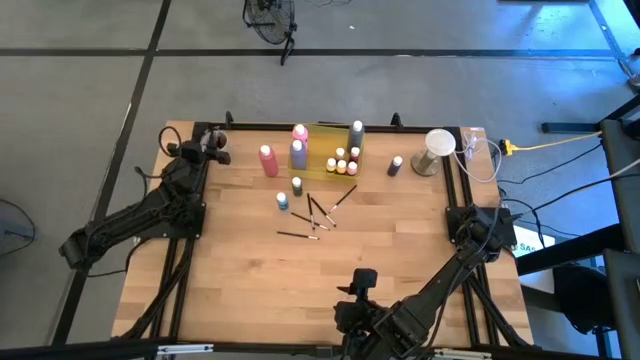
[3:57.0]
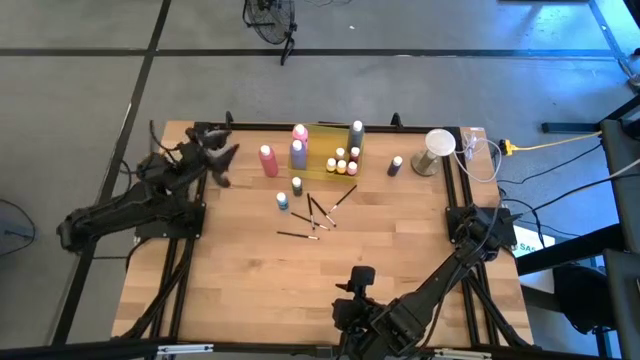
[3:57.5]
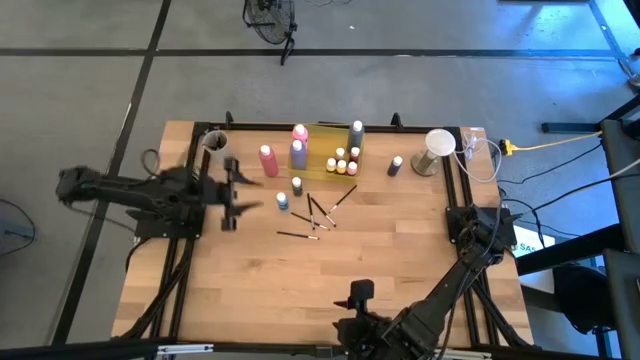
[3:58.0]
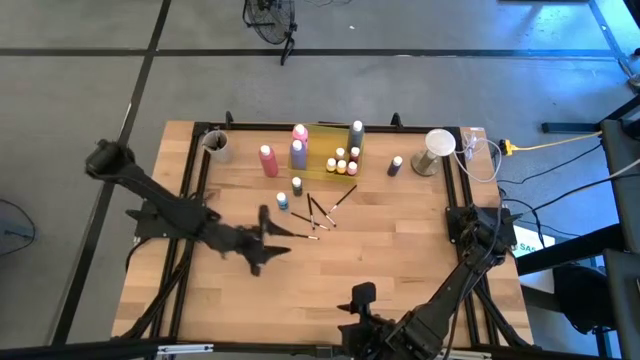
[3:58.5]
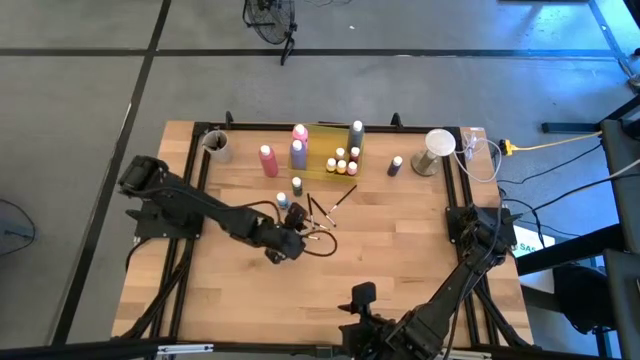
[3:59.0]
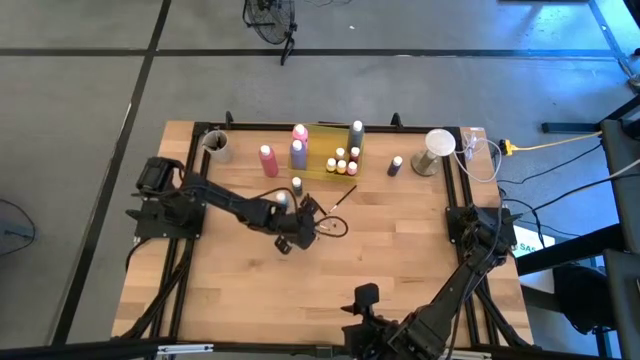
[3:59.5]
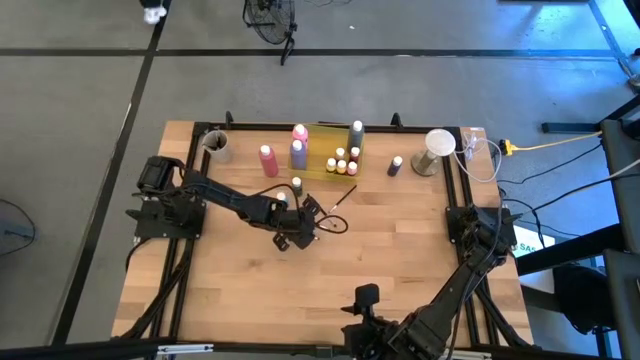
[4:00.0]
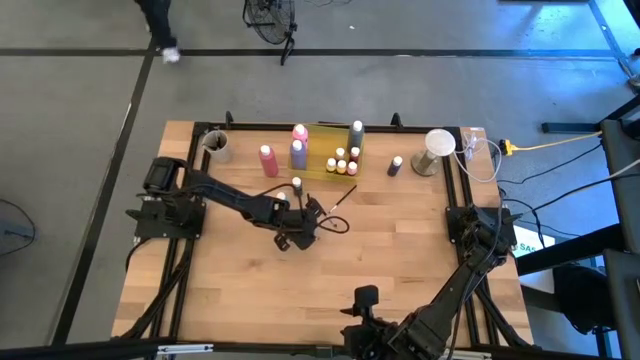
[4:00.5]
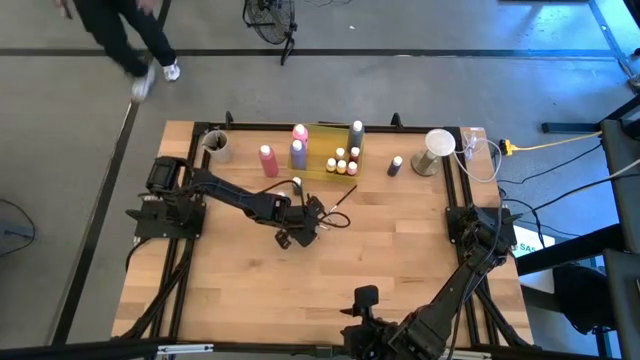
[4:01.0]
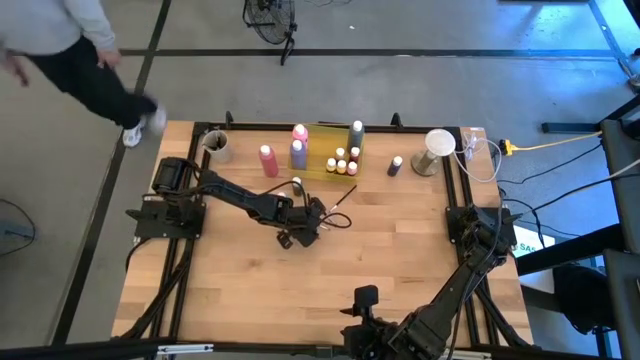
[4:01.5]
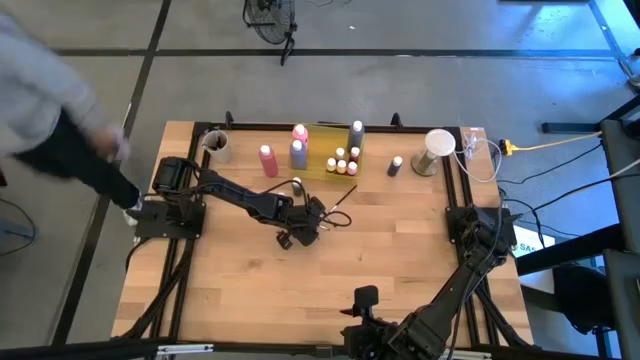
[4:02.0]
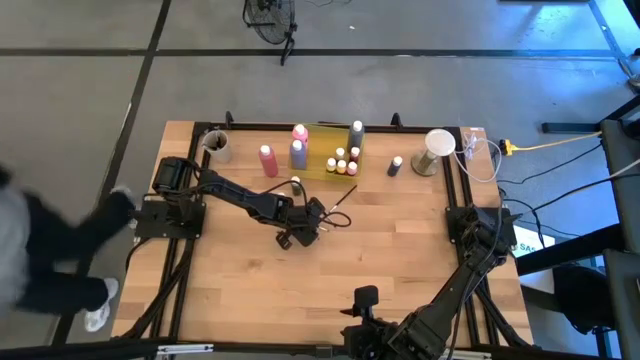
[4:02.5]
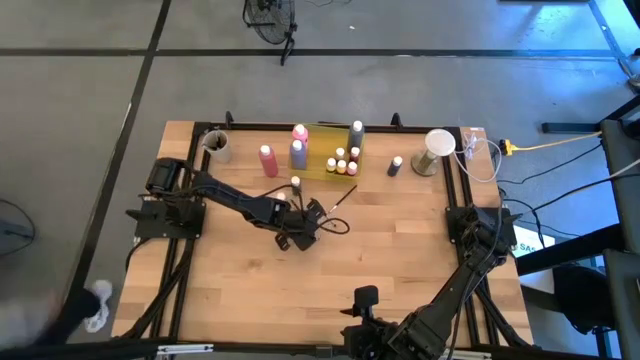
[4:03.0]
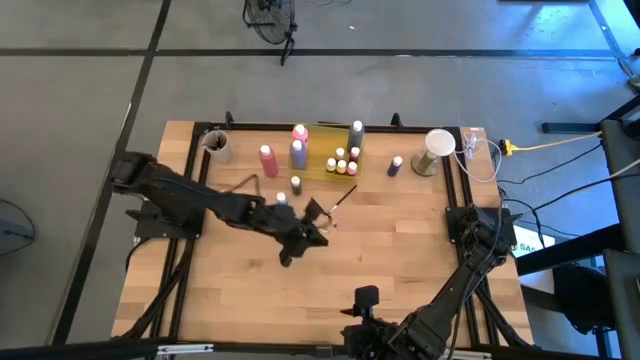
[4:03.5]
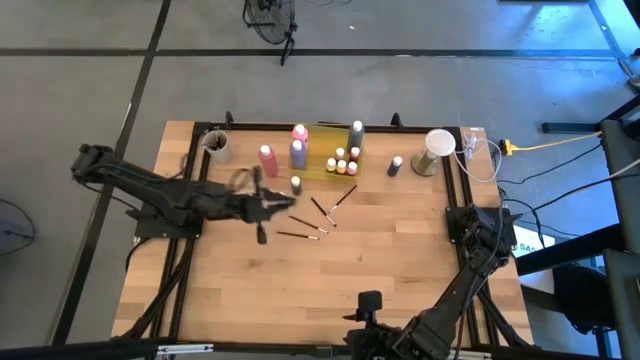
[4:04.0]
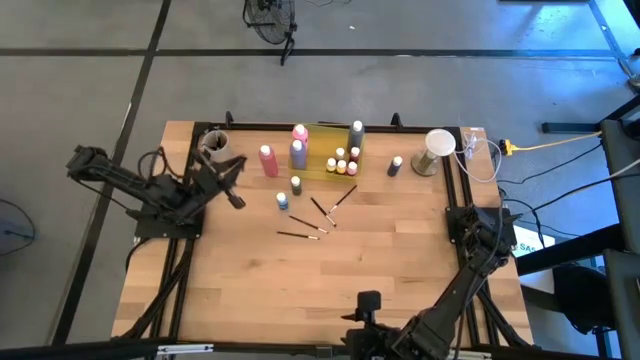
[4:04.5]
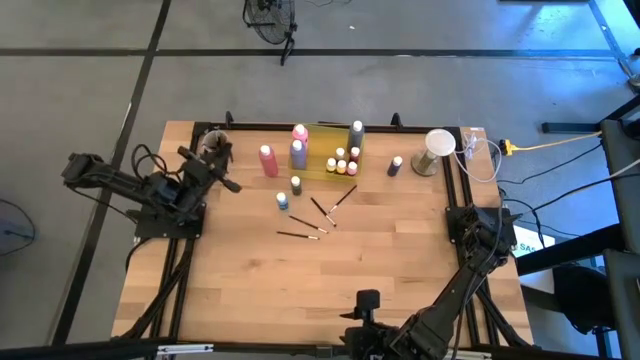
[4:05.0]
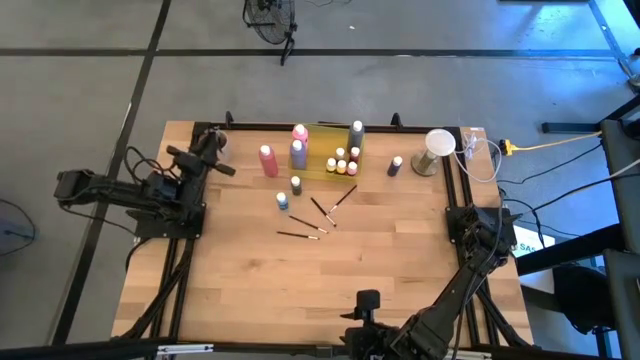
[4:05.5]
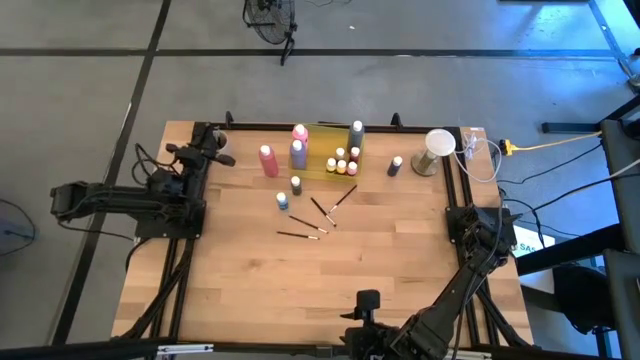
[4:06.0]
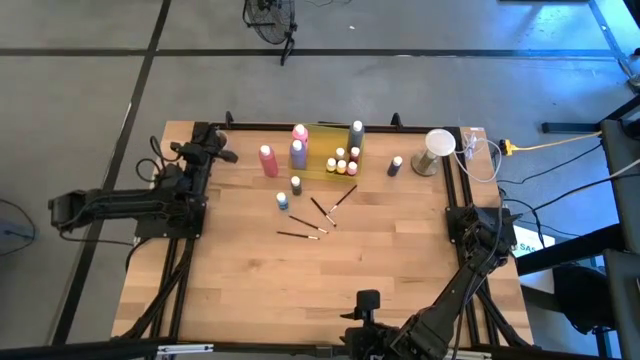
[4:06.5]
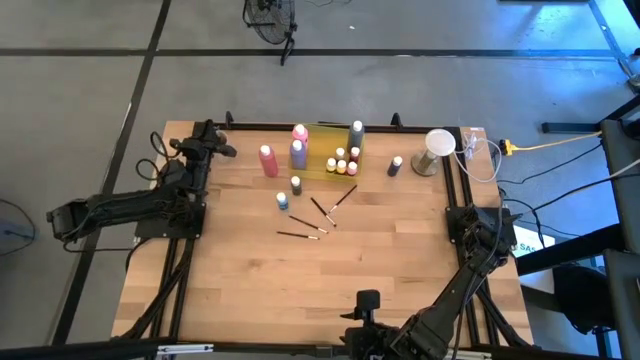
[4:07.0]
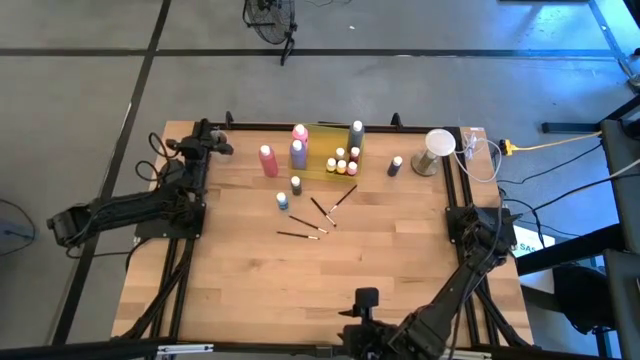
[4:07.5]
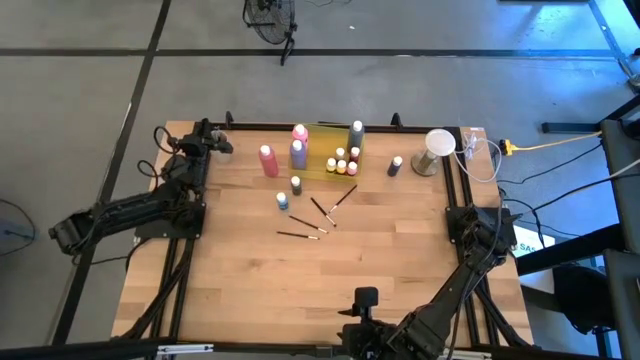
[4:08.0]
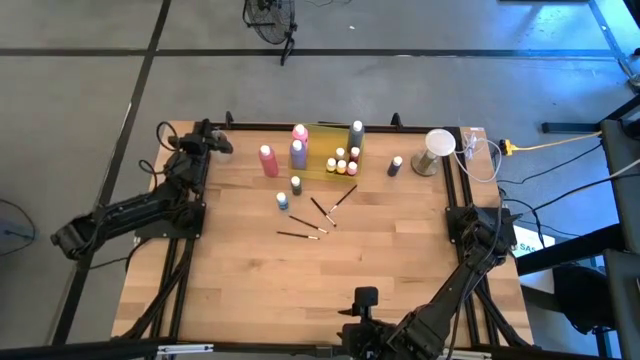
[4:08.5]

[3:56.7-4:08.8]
Task: Pick & Place Paint Supplies
Put the silver paintbrush into the white cup

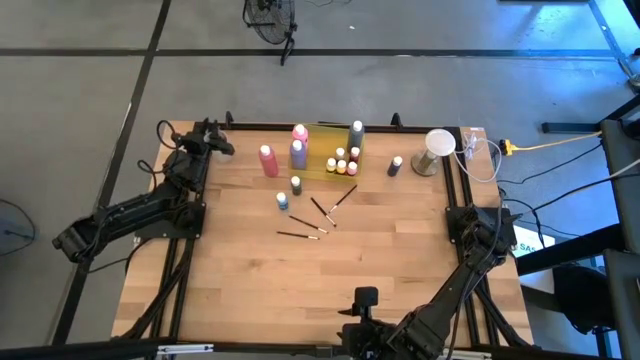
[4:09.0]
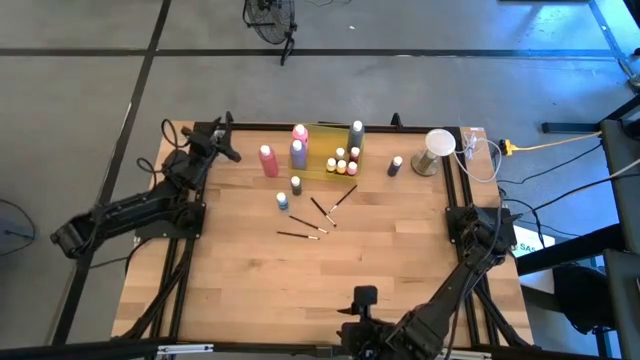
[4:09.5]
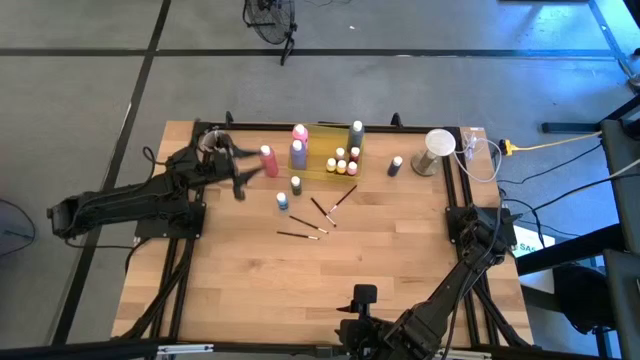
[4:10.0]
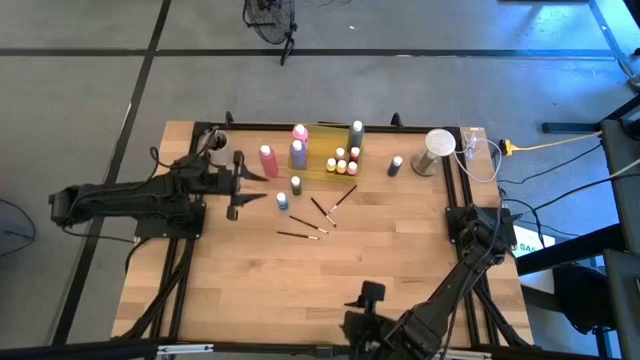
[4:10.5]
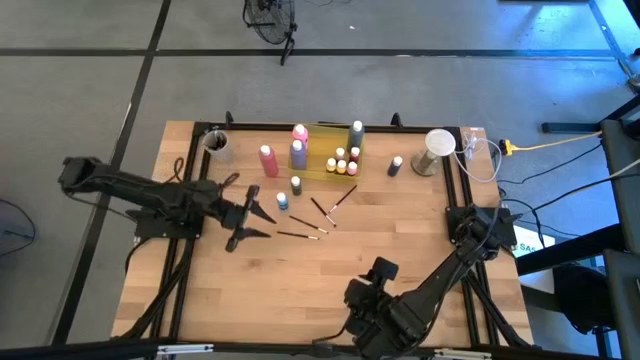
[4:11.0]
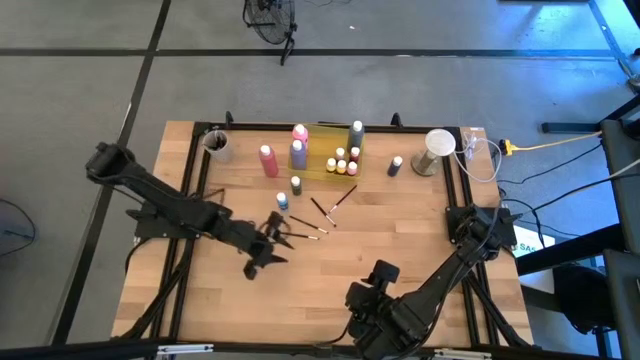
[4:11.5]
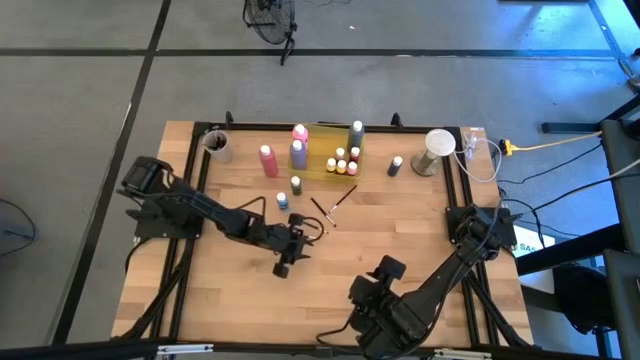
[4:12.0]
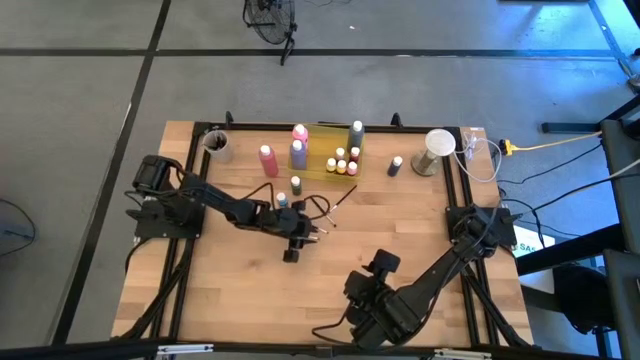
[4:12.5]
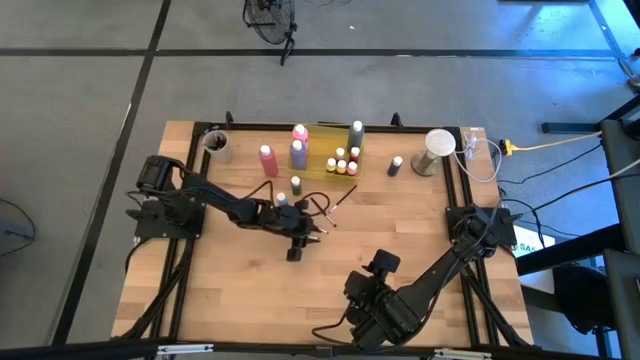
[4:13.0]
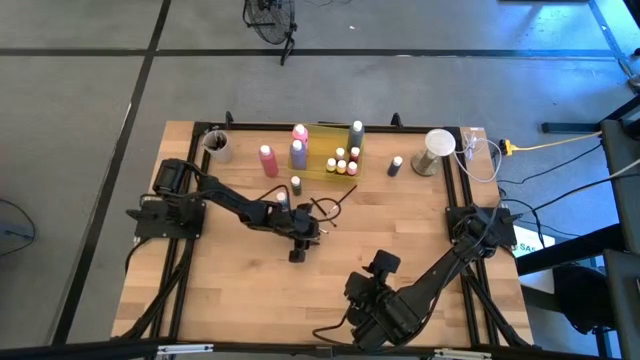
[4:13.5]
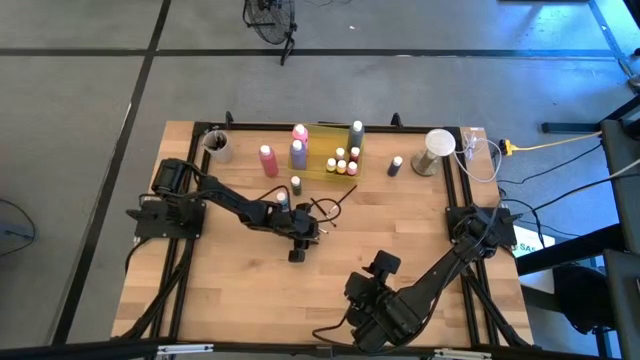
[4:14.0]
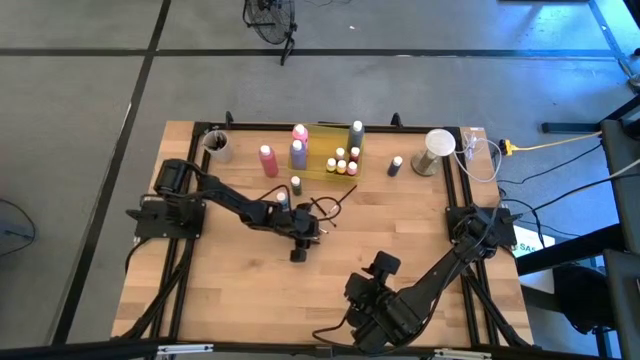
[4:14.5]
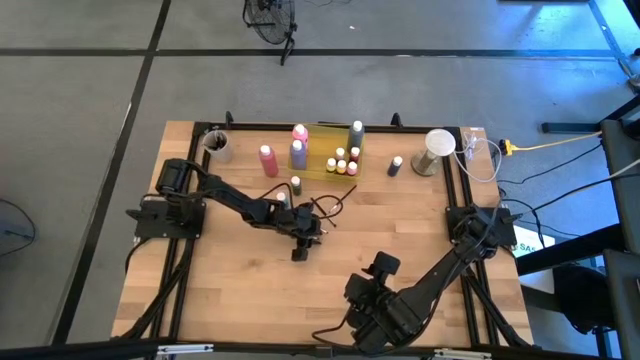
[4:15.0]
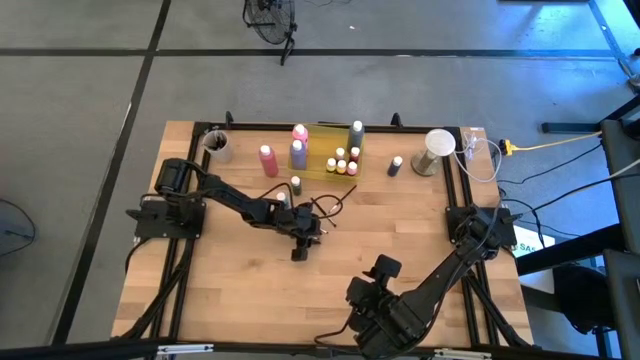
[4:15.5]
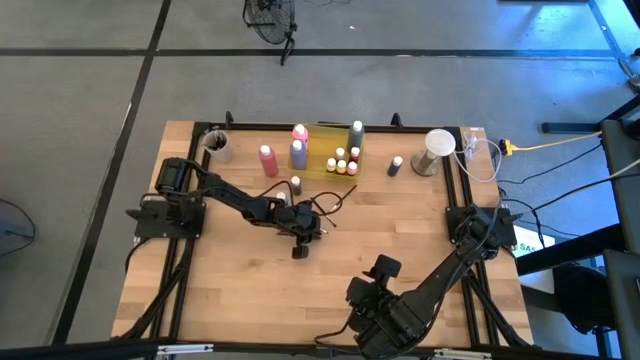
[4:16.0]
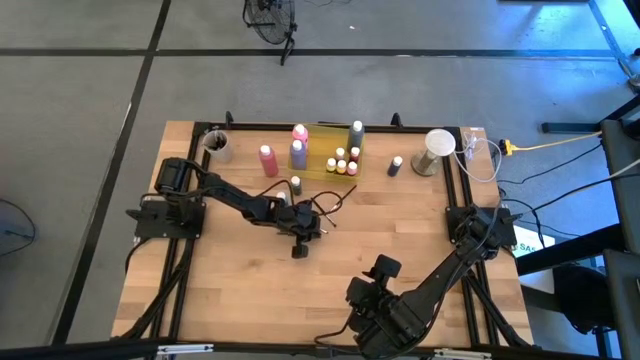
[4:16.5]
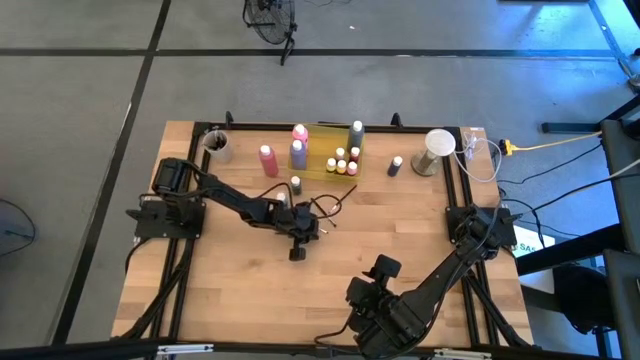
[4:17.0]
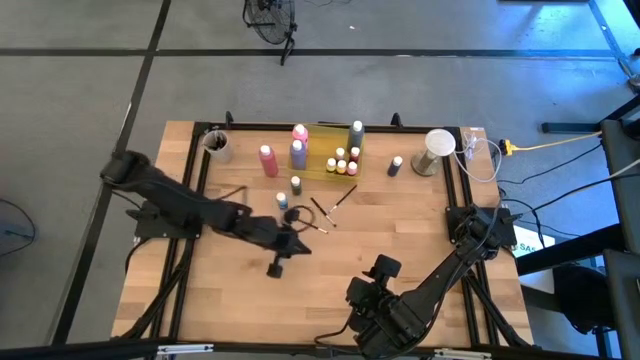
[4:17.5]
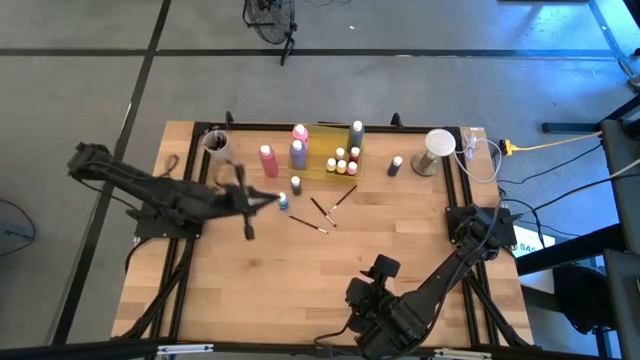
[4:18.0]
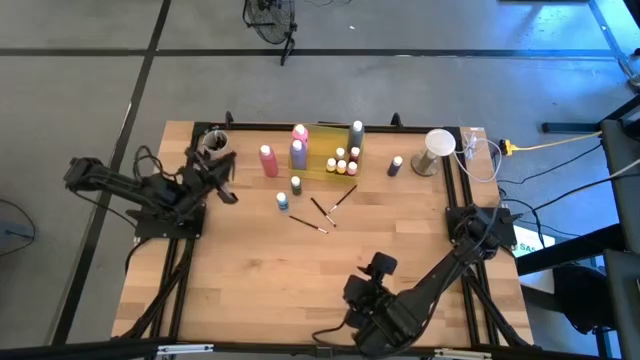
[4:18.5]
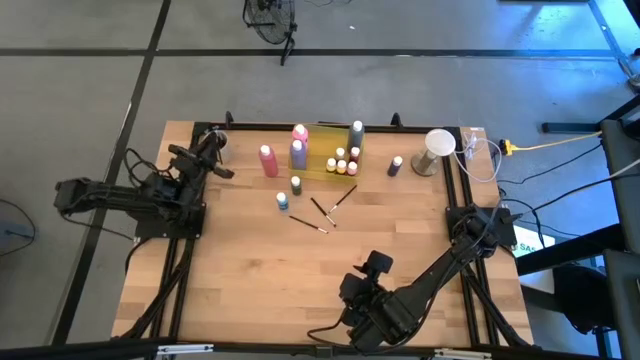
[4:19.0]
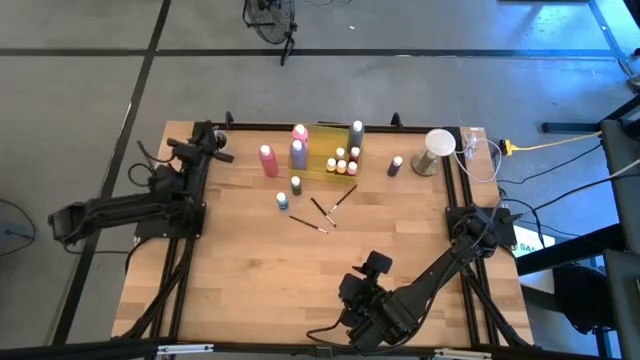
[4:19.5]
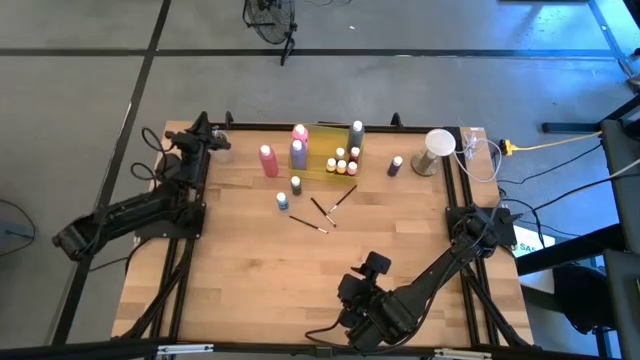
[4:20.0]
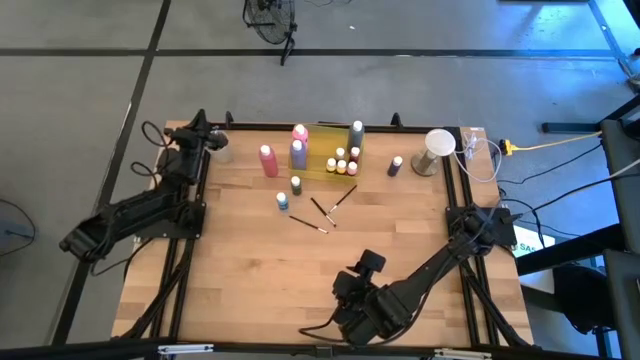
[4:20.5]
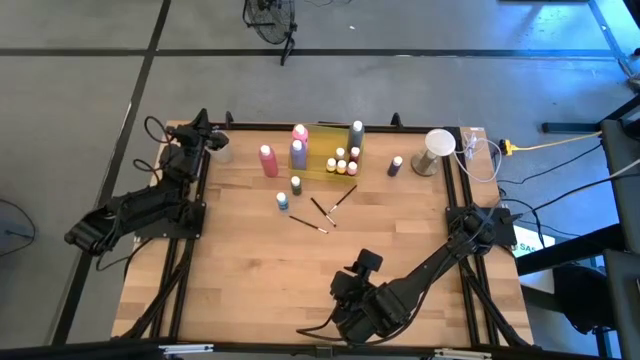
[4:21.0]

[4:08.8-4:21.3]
Put the silver paintbrush into the white cup
